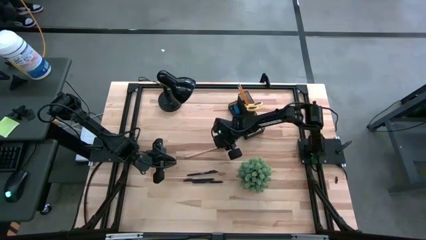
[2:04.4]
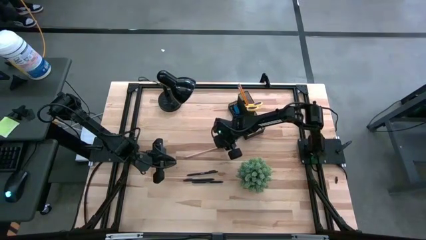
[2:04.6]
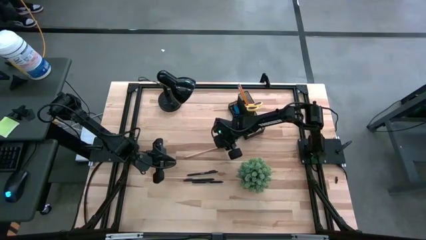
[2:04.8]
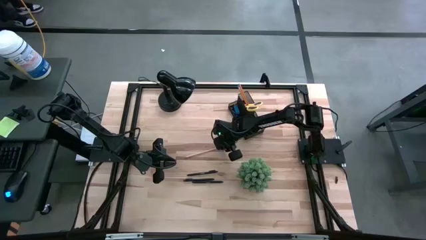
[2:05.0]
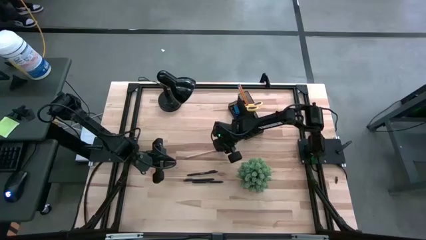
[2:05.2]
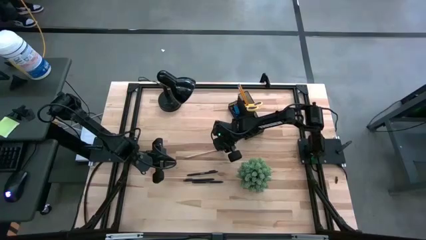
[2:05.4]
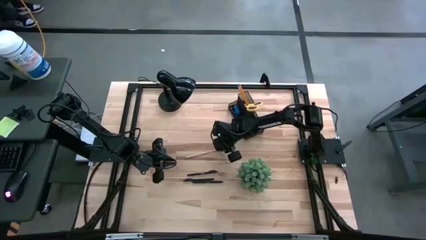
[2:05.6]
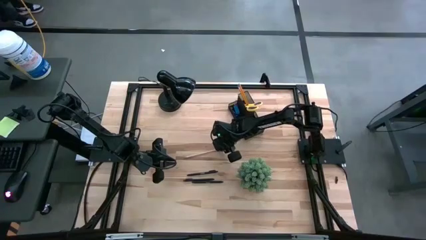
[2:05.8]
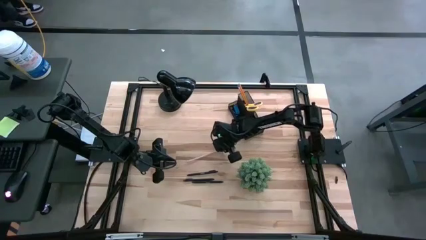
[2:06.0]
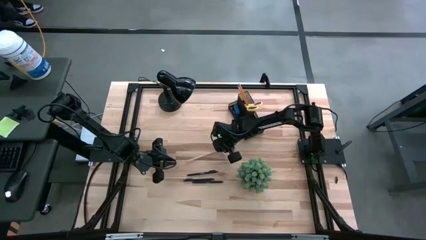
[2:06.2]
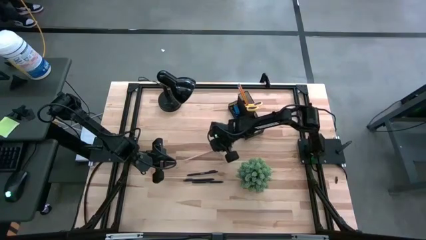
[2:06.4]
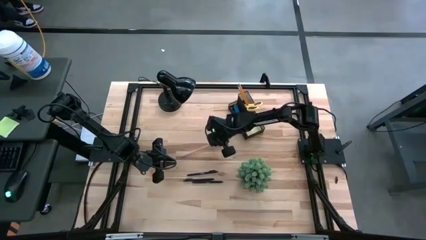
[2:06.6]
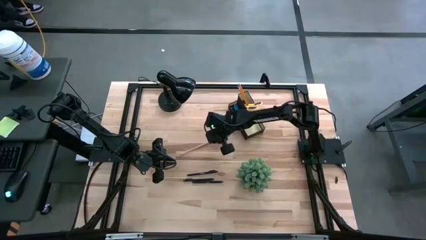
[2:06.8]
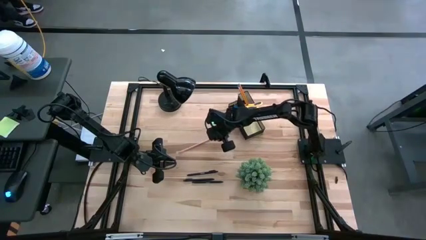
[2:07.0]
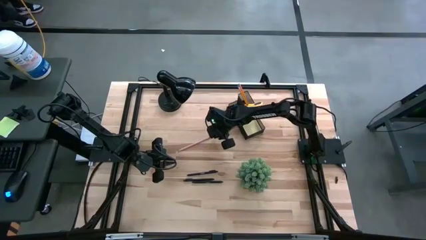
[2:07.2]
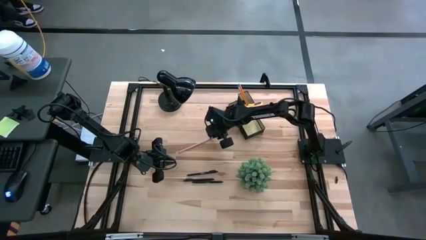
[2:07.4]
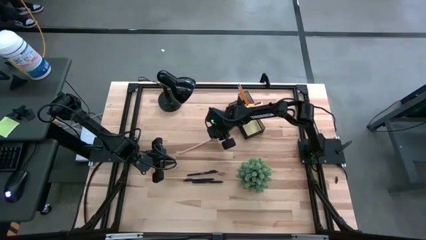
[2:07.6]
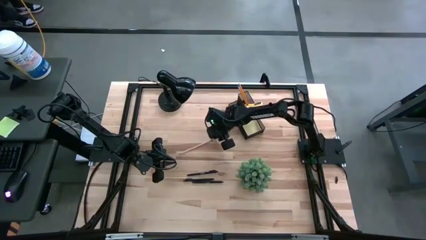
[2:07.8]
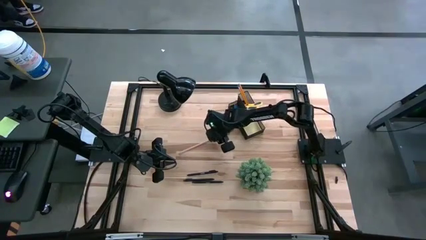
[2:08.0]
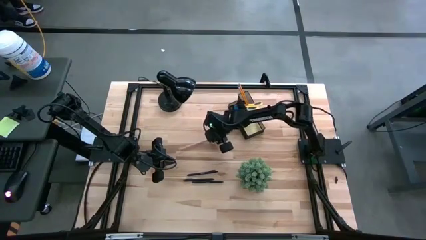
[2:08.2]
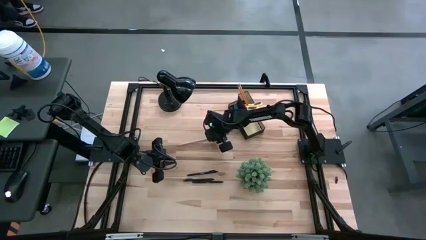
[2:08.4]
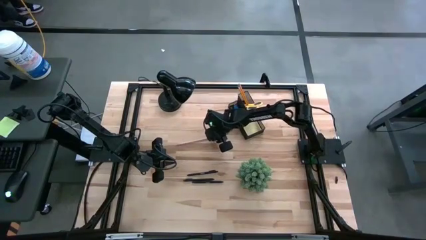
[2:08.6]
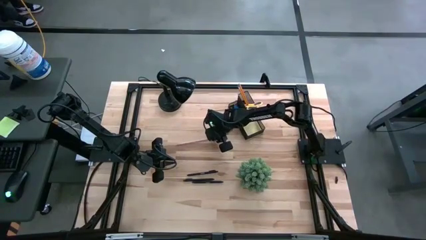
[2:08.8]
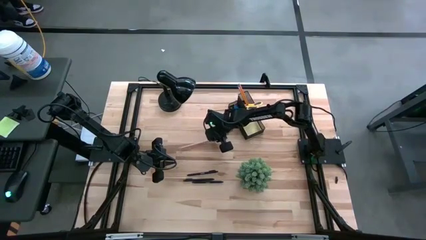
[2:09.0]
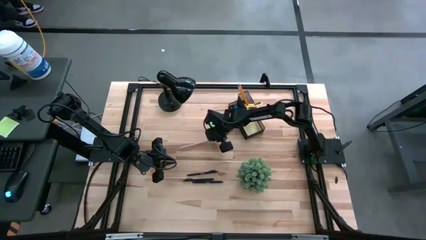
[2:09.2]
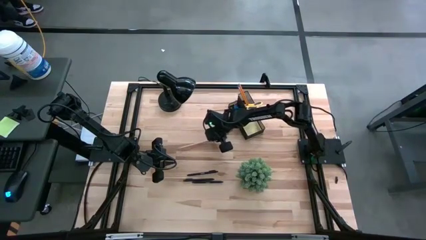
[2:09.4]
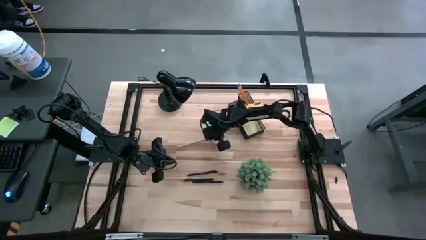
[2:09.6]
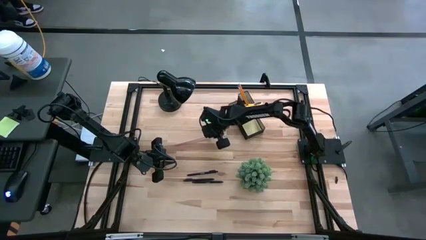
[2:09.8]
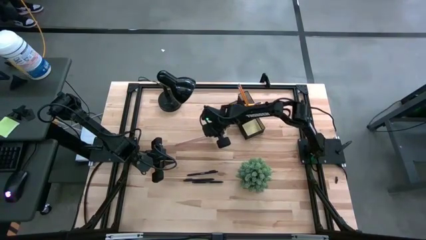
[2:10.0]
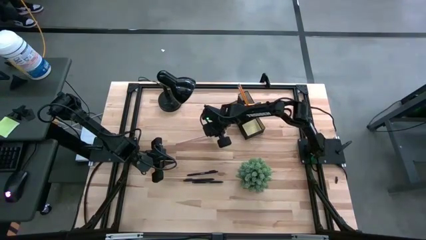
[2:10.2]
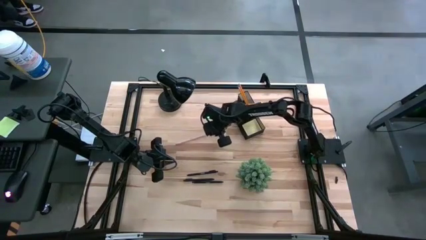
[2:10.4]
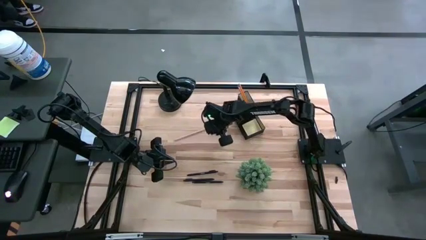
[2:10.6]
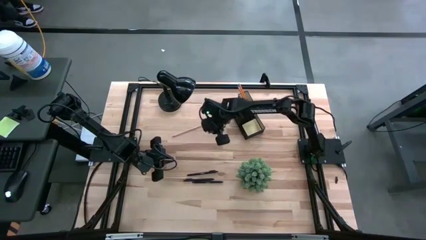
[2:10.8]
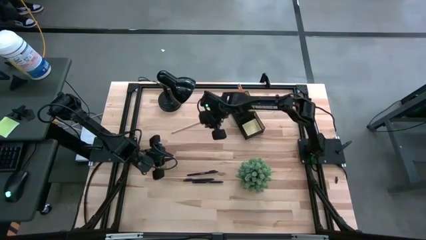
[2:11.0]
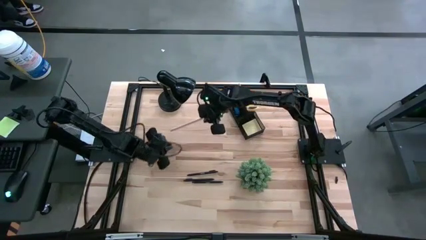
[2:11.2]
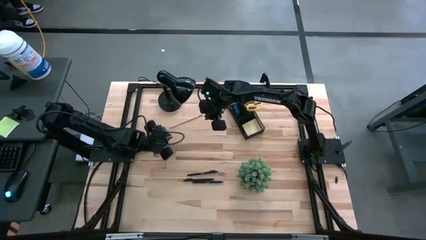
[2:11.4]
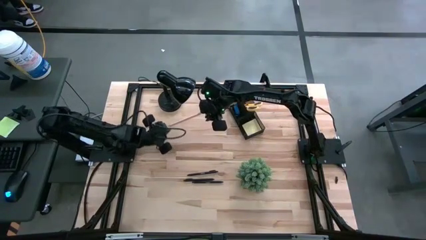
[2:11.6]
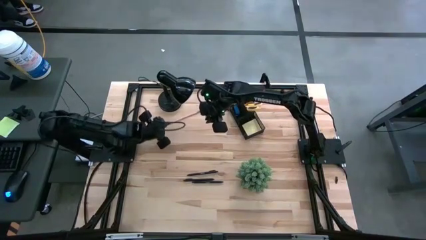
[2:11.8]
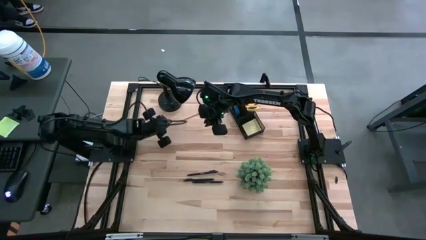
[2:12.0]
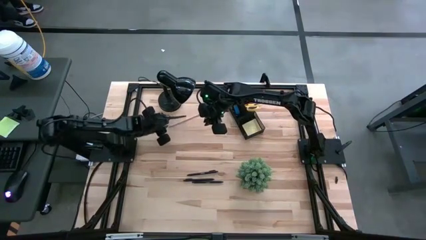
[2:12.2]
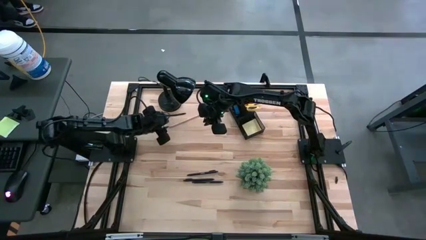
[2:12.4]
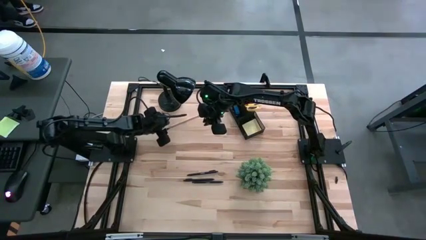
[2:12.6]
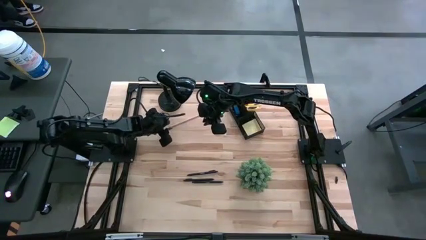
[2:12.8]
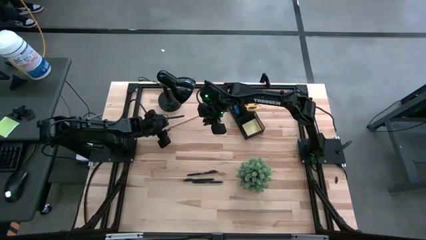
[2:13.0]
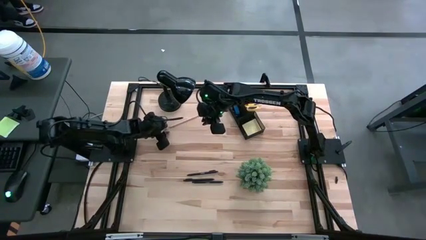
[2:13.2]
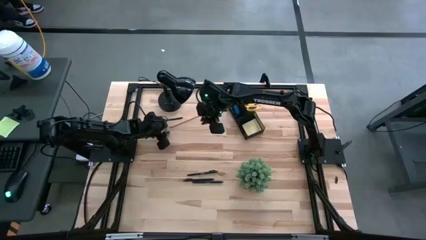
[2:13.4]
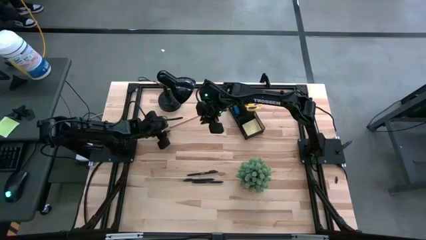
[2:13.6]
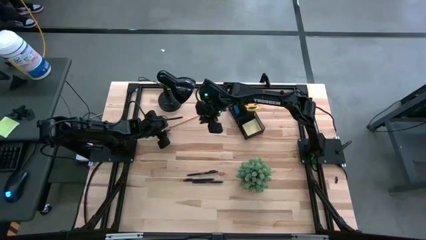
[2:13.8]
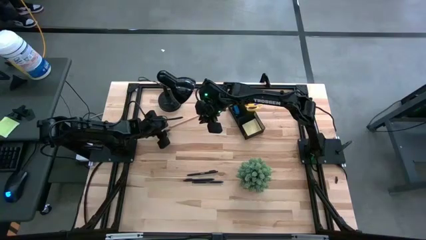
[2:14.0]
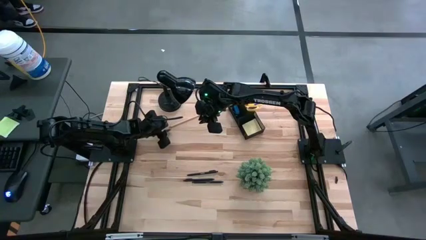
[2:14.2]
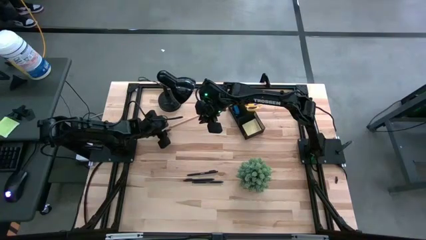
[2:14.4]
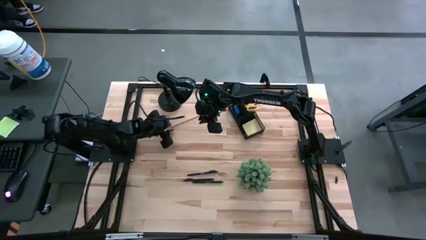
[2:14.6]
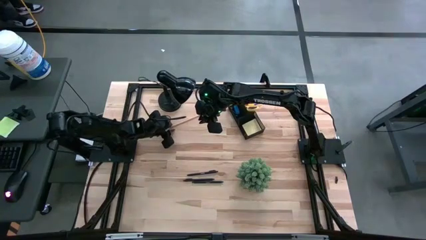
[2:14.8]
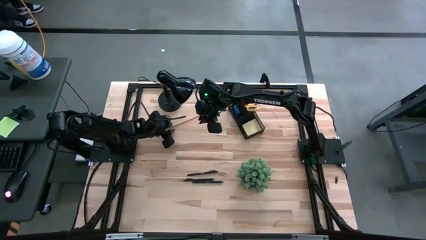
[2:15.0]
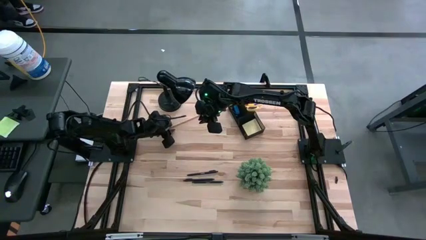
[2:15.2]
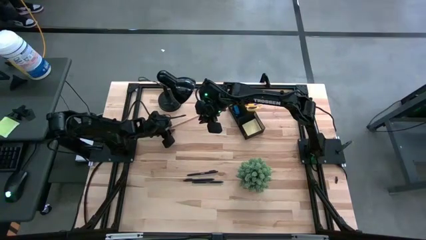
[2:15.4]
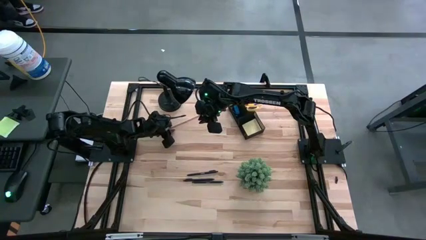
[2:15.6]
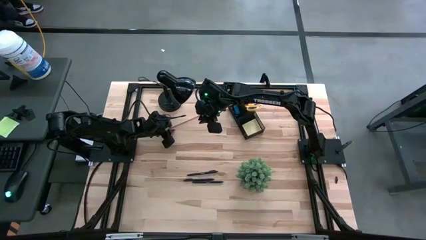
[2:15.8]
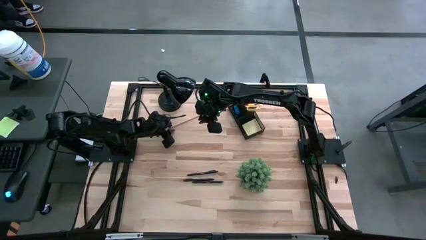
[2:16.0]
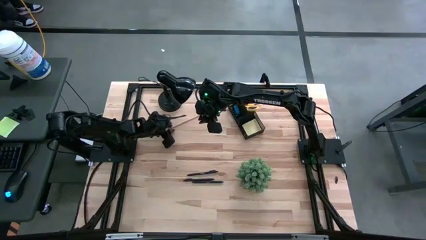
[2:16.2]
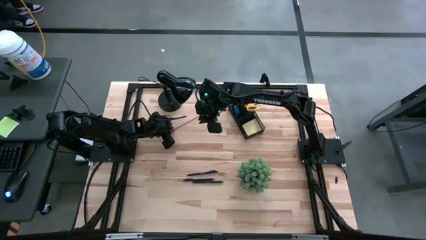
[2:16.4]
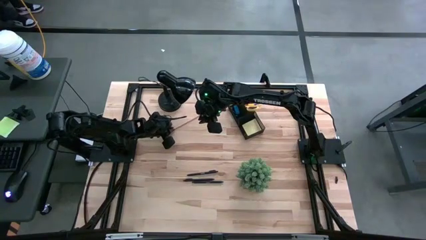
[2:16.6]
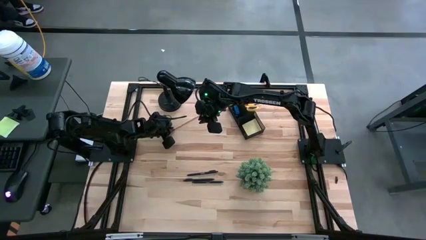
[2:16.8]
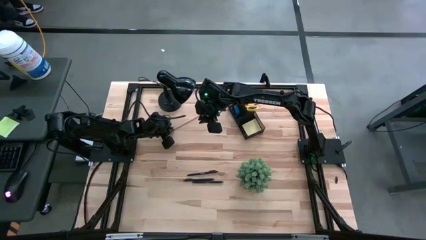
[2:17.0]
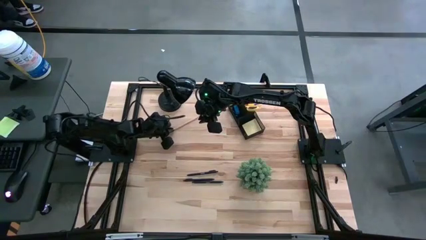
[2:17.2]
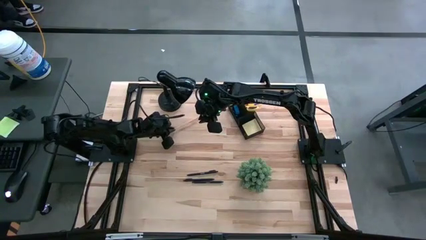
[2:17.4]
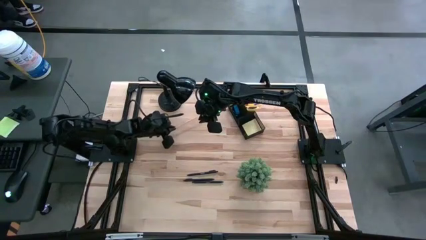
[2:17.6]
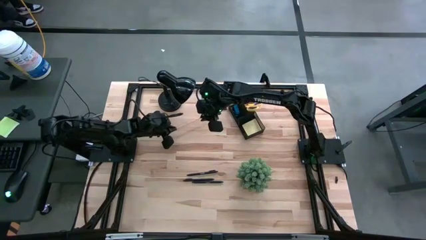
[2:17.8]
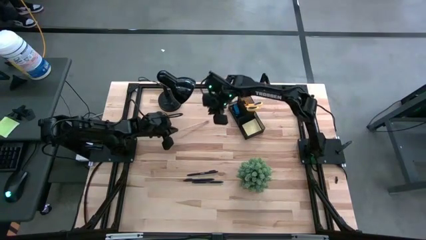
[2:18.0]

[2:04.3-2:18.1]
Task: Pick and place office supplies into organizer
Put the white pencil into the desk organizer

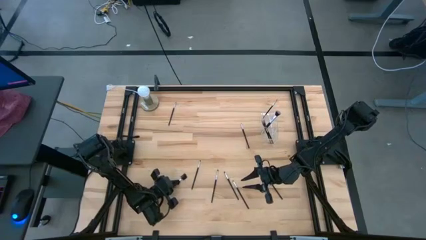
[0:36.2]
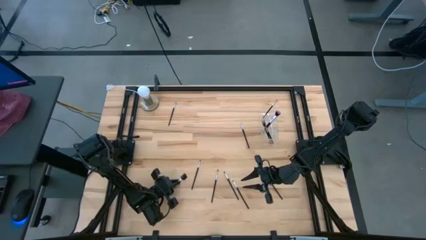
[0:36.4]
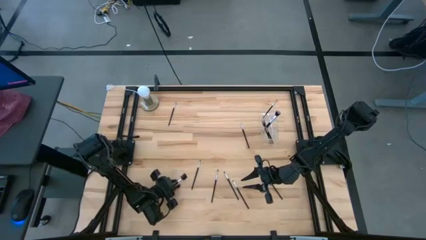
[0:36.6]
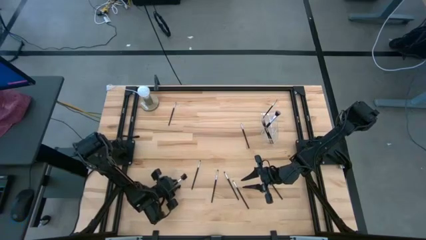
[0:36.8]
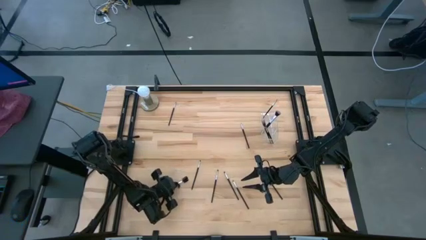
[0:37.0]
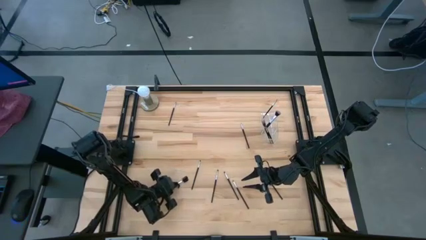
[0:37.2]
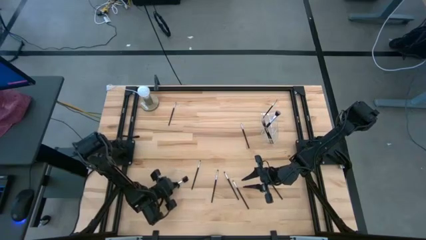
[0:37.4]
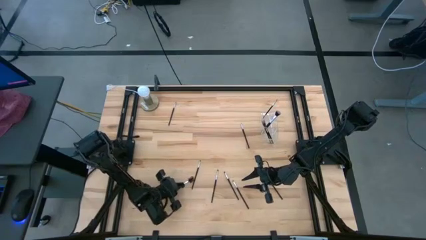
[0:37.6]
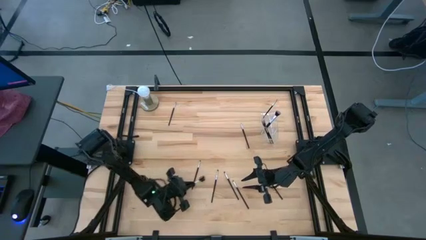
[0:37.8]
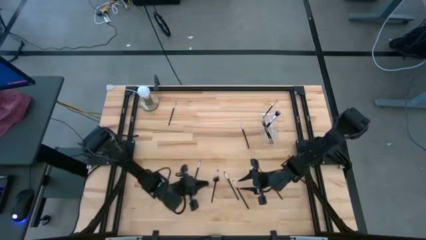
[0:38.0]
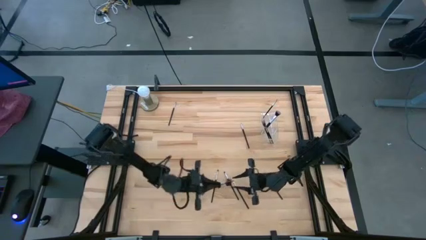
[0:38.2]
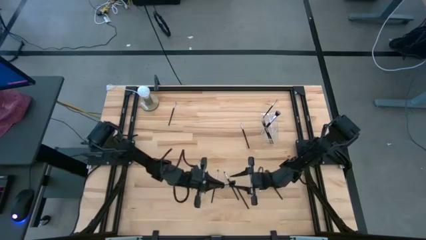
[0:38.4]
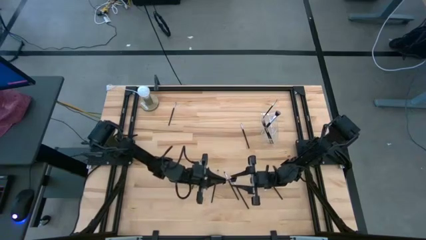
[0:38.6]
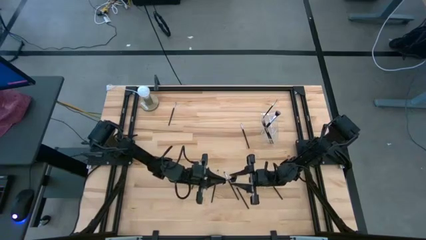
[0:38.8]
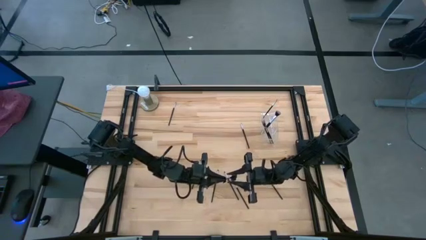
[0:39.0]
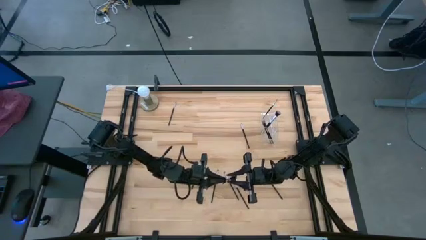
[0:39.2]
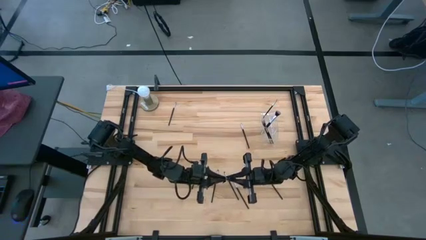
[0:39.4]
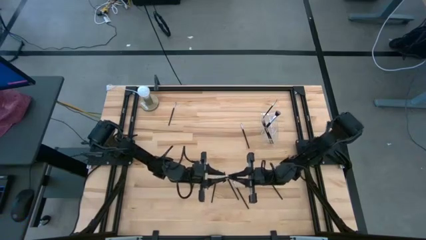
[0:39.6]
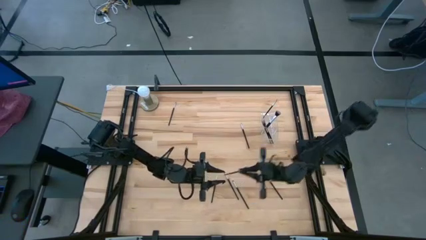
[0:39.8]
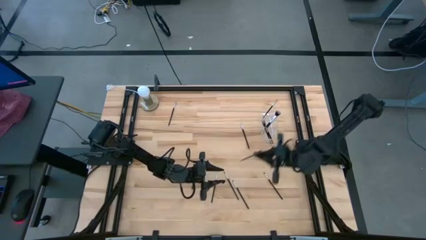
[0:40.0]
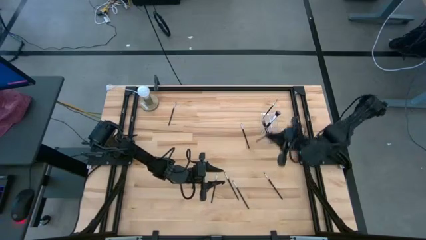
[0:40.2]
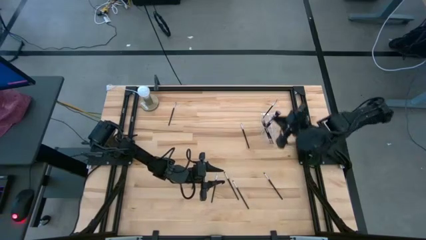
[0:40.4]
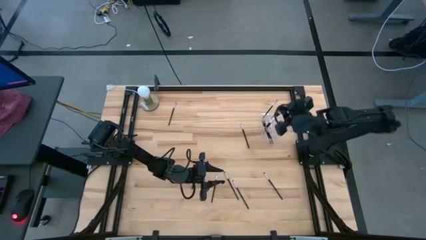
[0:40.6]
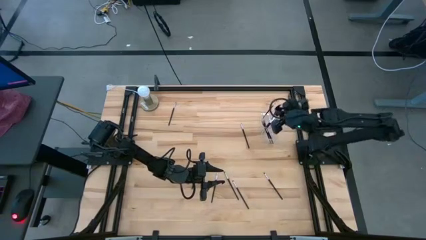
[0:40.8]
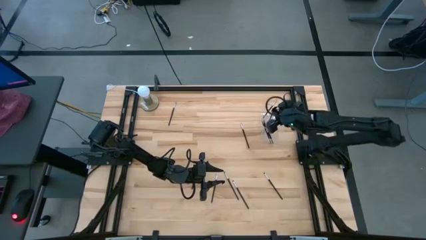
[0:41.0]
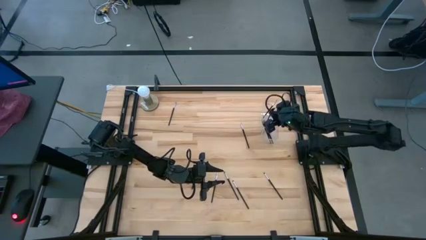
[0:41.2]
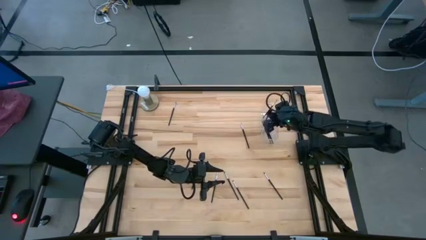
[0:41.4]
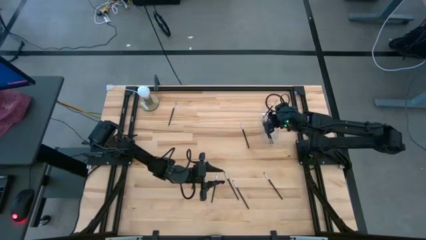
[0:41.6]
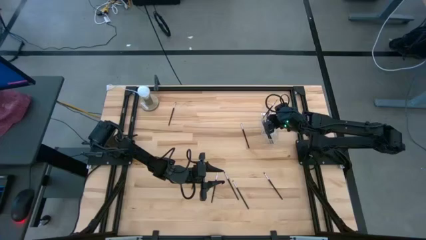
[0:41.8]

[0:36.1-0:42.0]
Task: Sort items
Put the silver lash/brow brush into the transparent organizer
